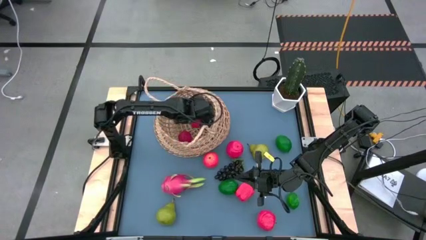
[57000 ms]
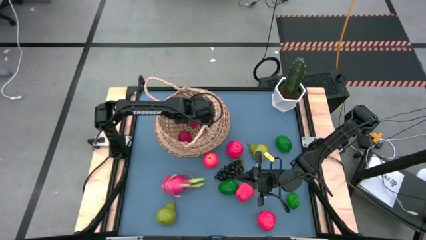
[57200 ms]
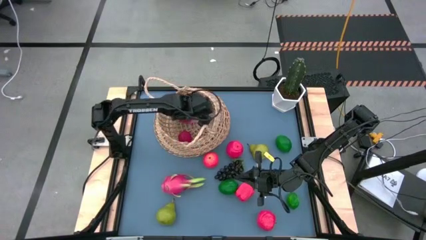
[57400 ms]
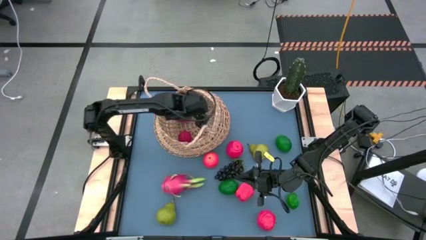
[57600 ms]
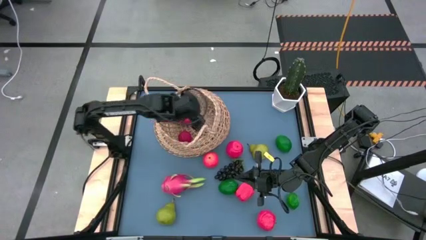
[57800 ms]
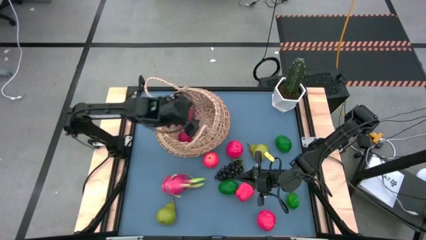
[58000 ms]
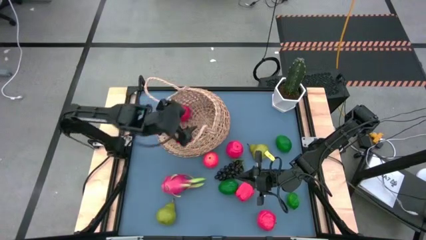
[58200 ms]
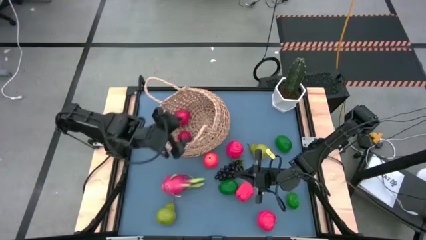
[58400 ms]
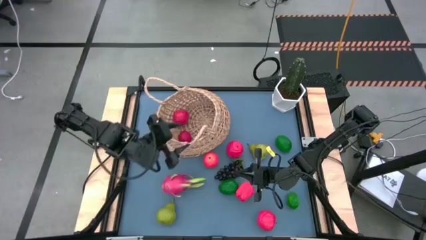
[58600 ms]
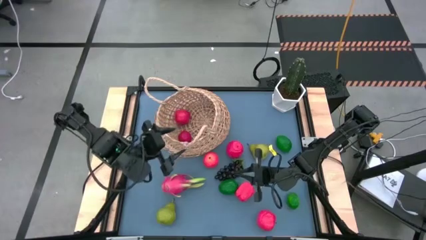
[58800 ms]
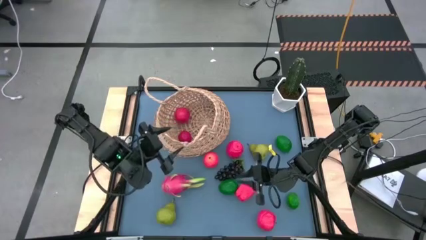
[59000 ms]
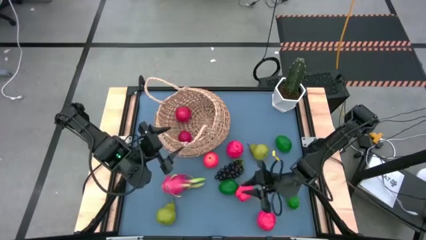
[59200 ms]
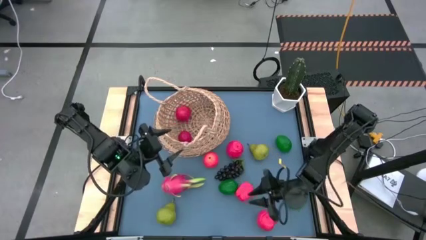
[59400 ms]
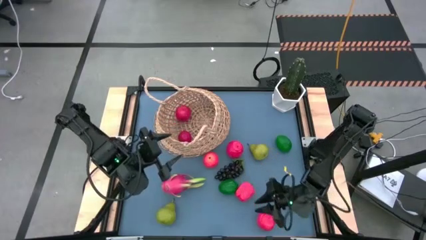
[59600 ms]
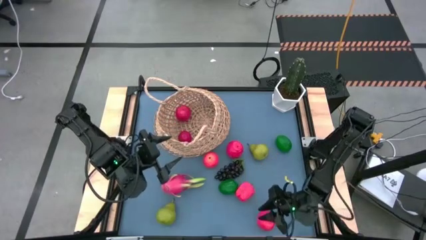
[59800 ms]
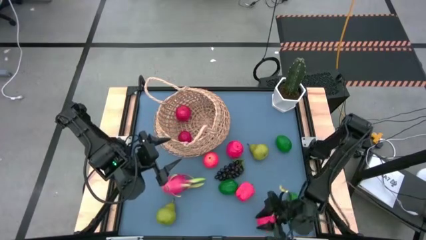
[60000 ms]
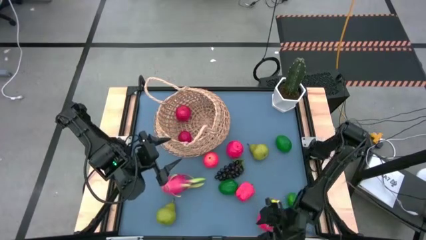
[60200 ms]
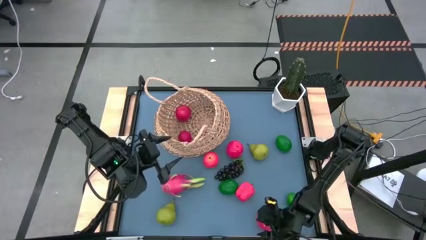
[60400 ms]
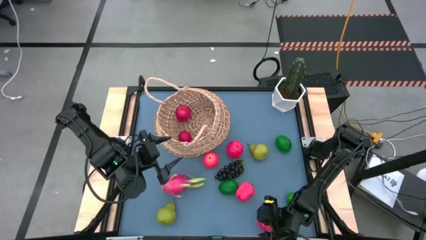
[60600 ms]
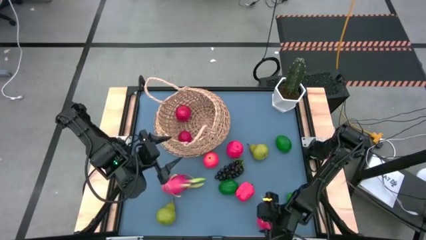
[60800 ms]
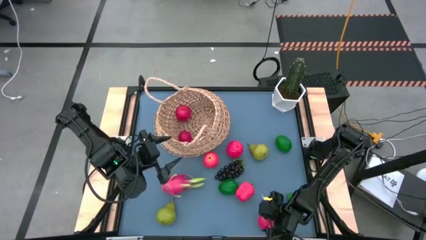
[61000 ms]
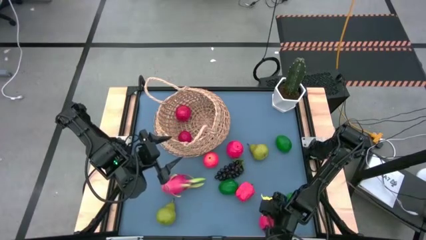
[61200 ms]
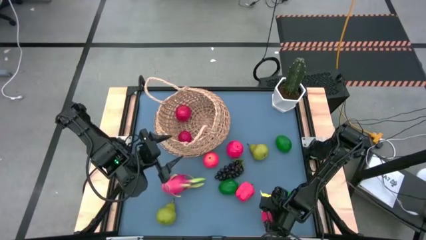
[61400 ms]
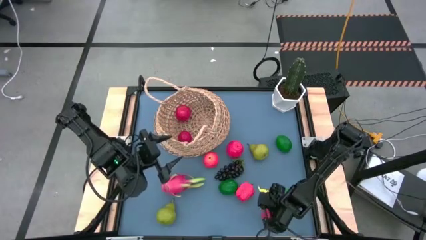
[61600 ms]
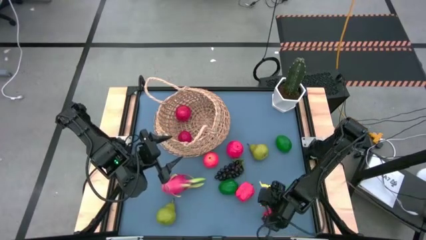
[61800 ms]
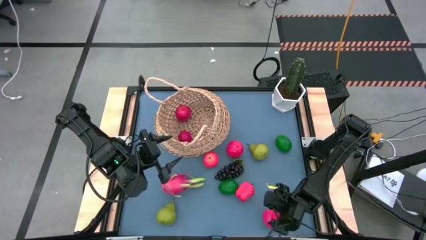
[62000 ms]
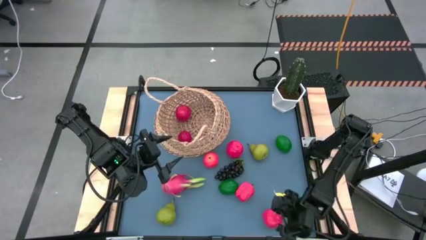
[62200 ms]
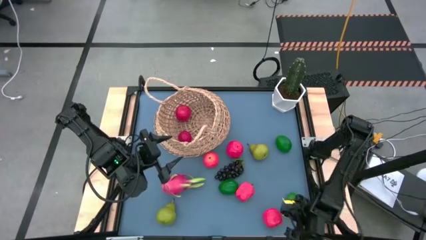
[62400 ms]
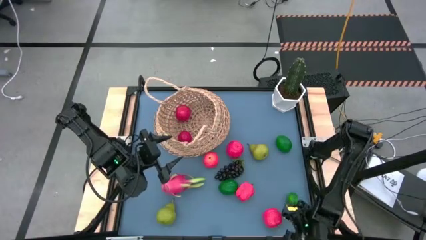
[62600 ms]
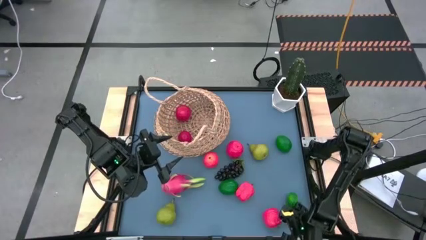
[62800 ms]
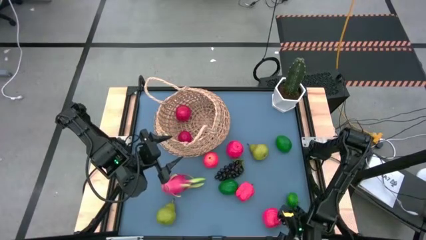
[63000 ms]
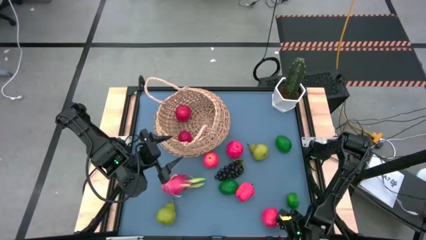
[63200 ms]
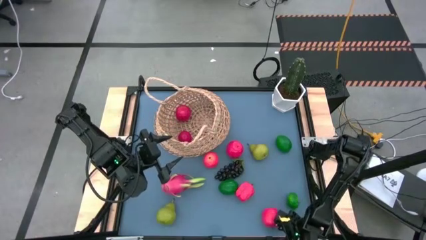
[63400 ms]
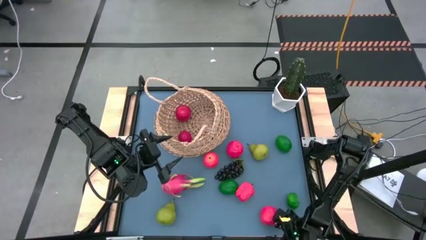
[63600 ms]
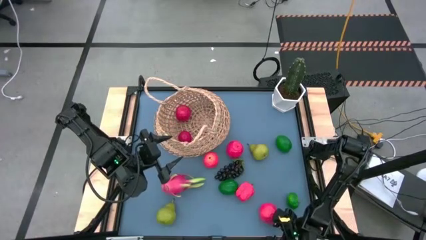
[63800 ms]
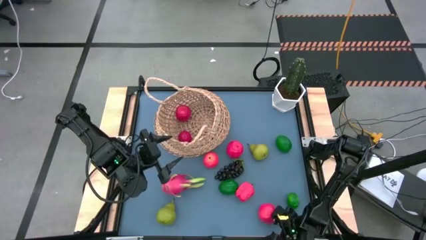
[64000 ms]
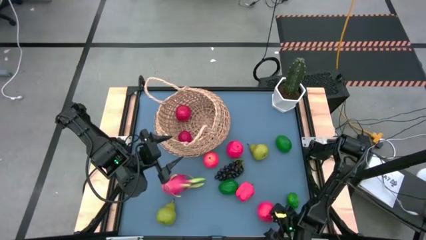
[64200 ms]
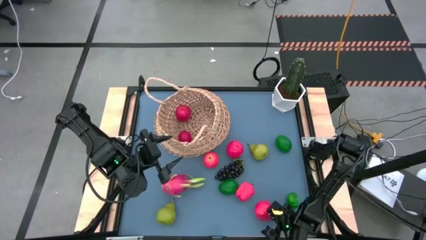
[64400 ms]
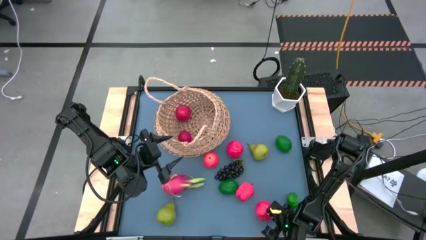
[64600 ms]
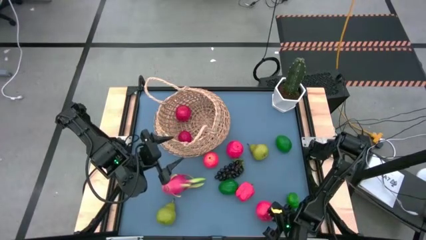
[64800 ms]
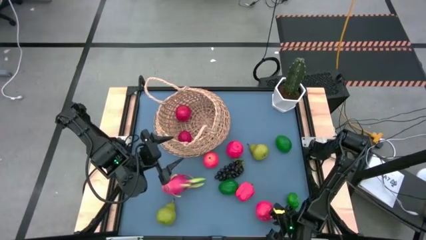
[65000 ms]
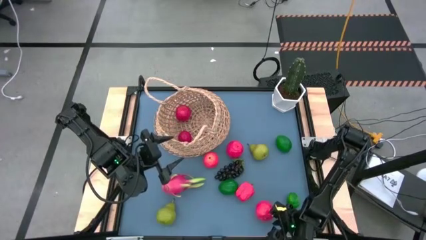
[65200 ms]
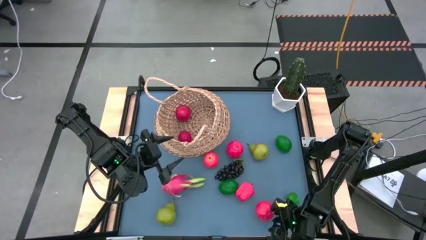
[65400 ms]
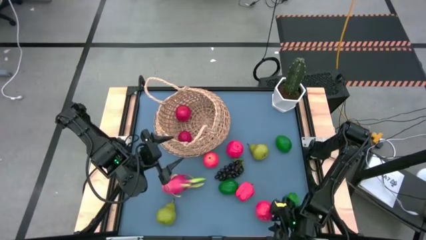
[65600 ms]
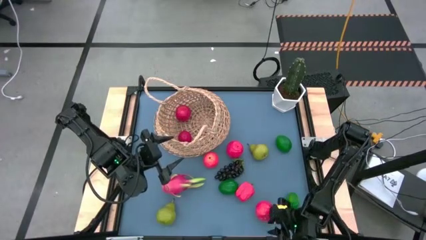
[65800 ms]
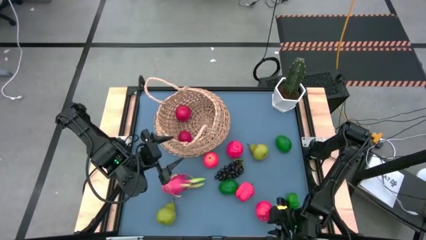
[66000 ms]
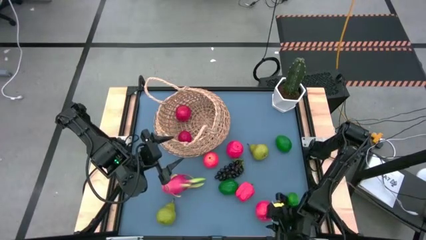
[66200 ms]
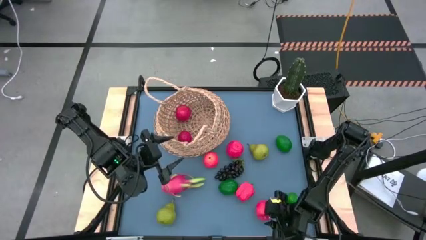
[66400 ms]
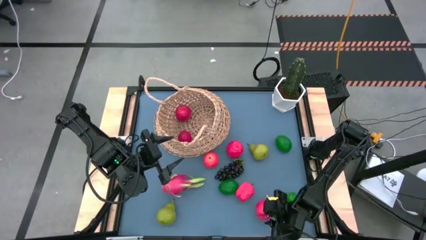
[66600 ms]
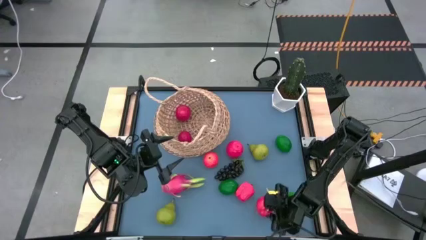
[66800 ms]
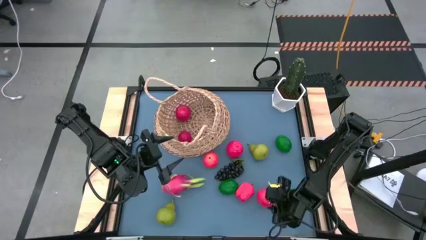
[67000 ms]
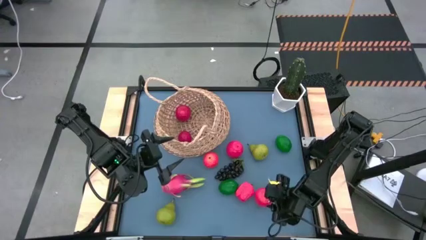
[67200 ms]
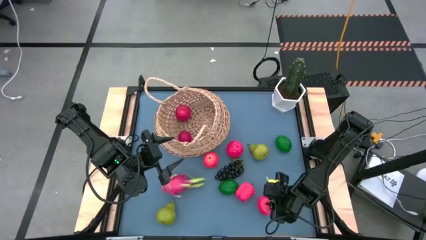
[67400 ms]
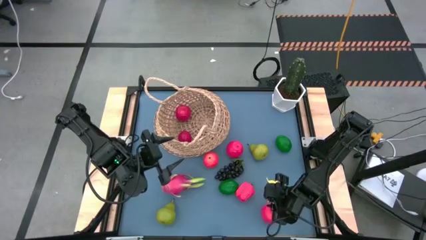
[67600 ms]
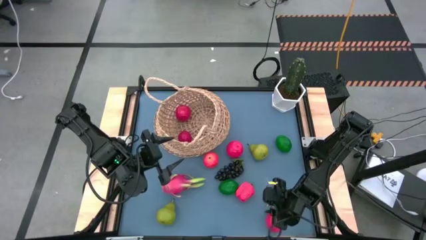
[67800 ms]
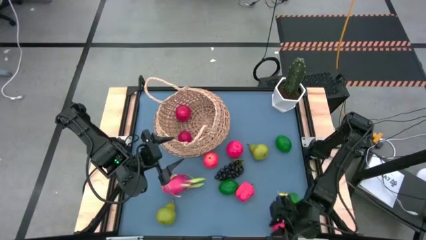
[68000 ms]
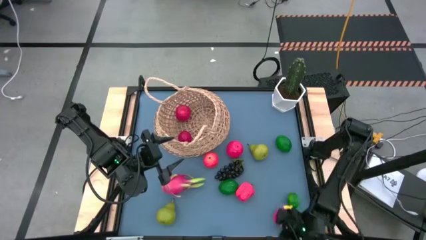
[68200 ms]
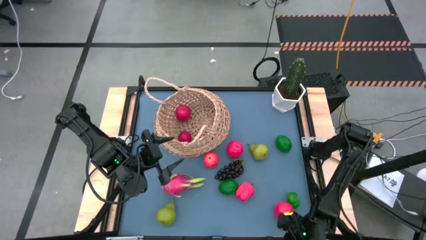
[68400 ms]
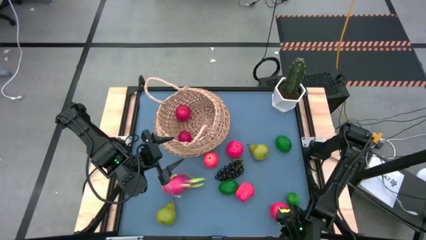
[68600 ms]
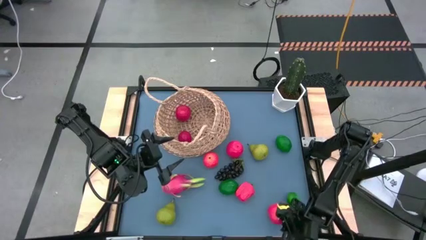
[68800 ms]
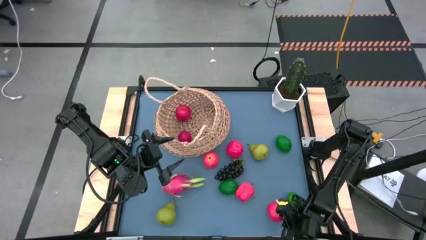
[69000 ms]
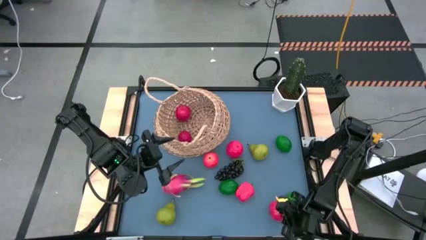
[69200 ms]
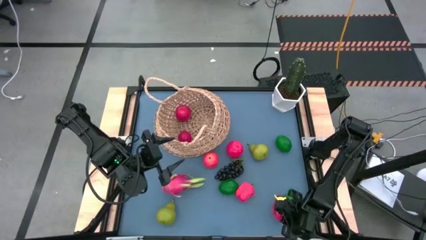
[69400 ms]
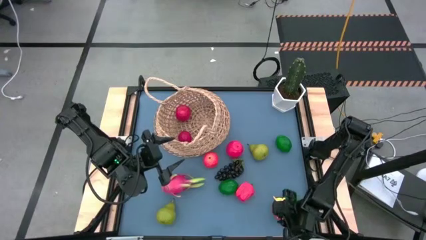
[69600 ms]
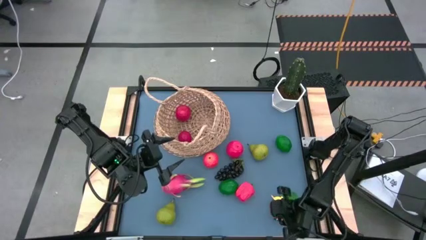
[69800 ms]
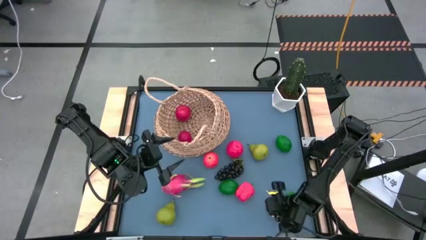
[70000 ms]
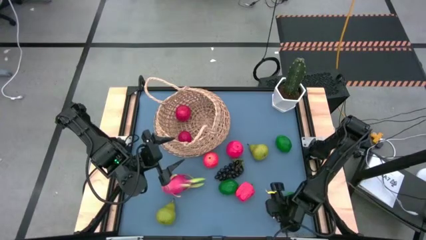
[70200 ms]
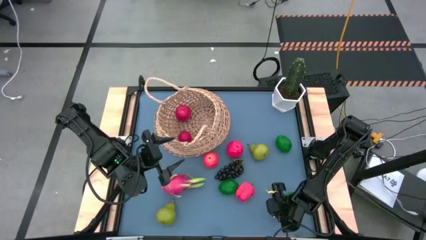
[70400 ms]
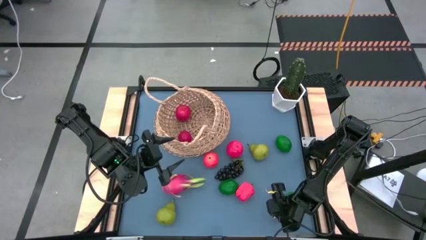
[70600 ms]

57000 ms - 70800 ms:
Task: Build produce basket
Put the red apple into the basket
